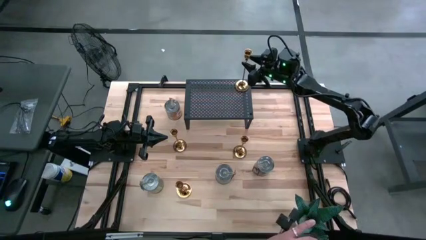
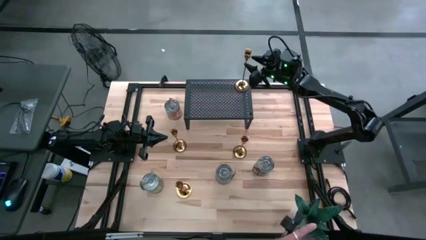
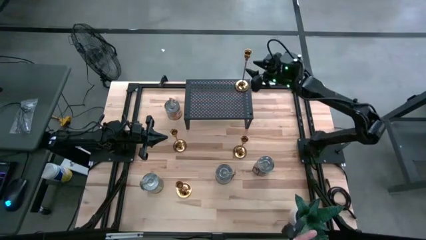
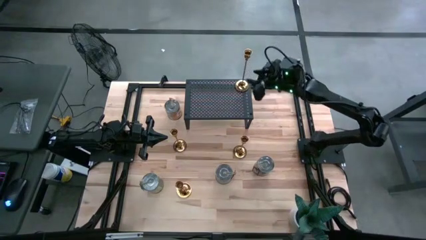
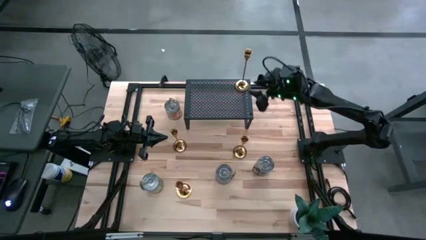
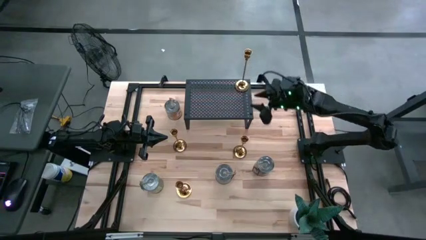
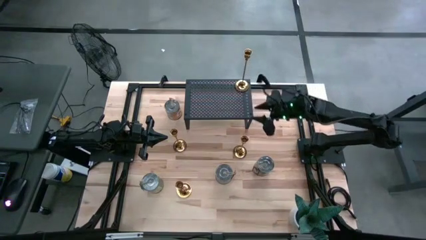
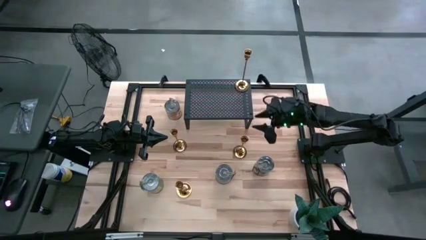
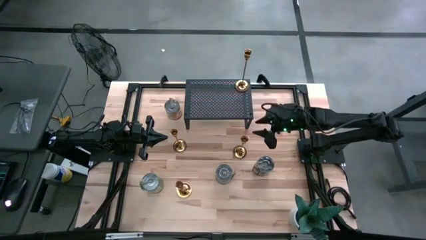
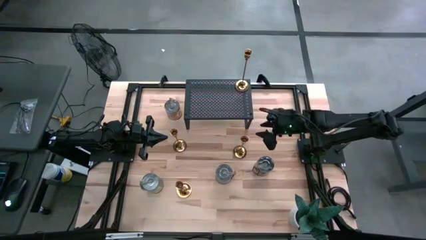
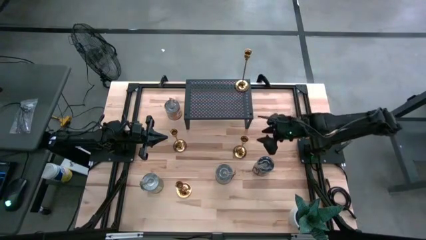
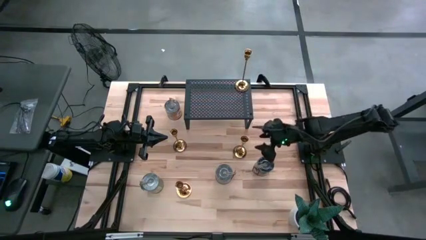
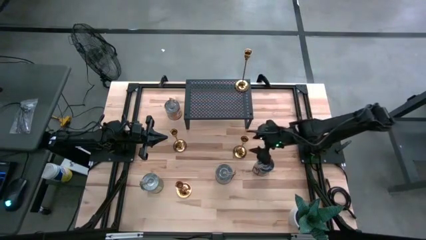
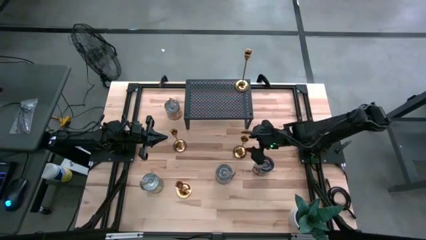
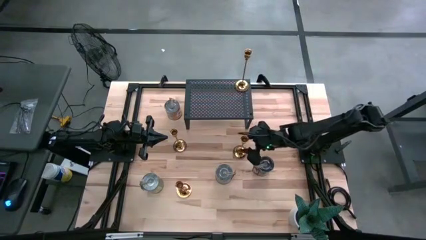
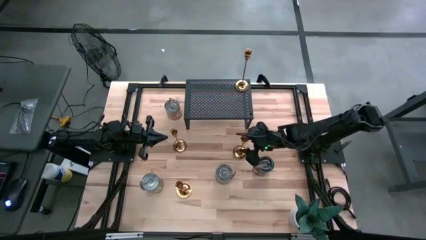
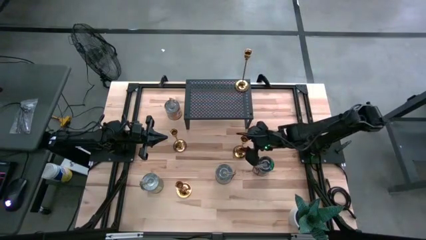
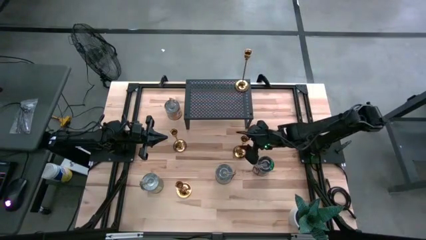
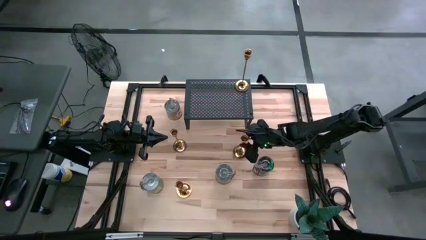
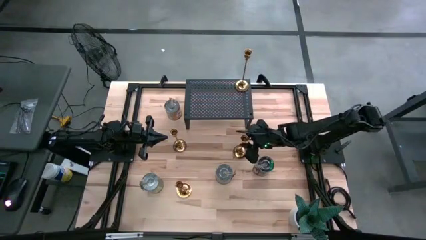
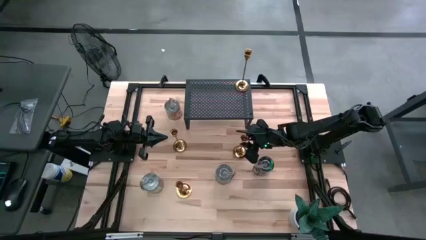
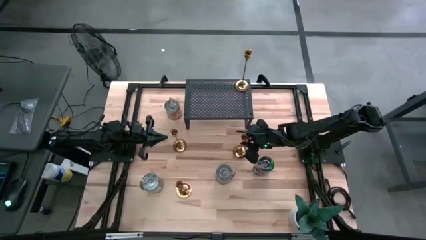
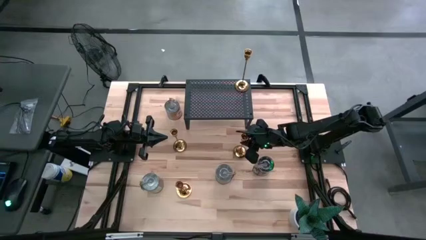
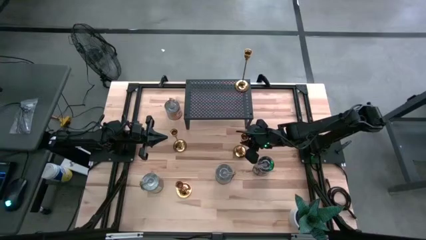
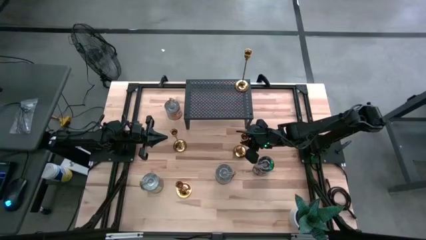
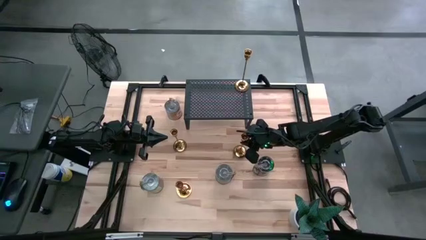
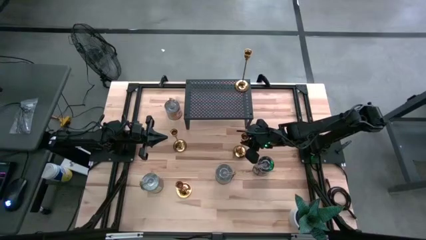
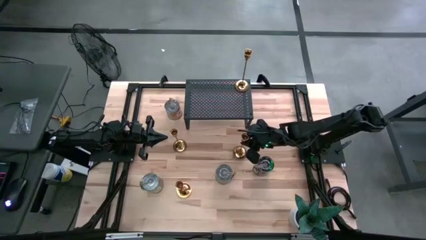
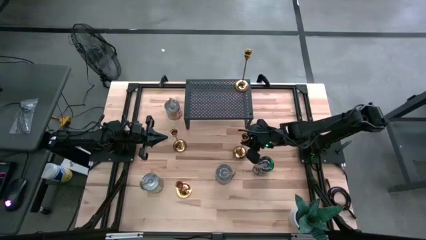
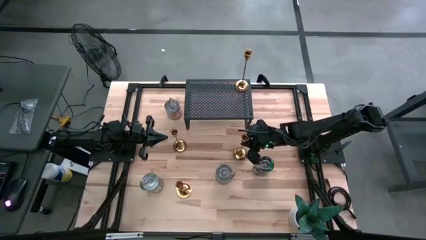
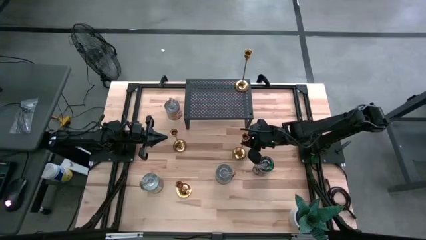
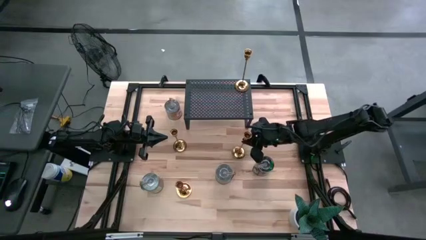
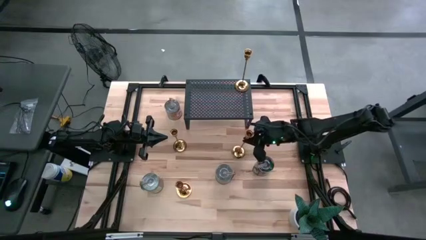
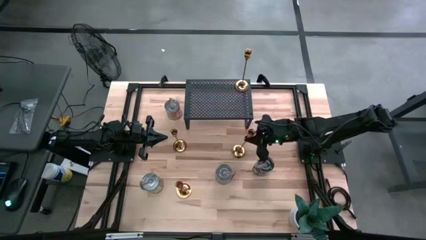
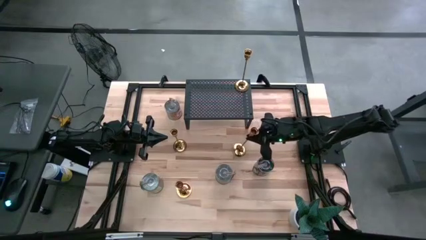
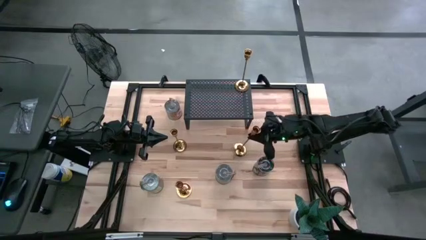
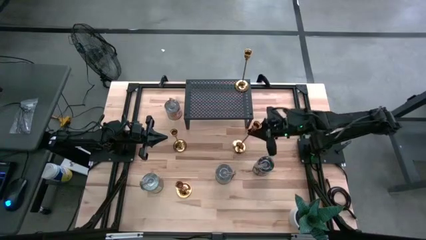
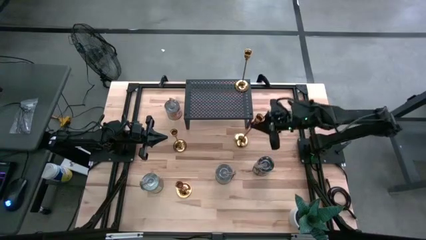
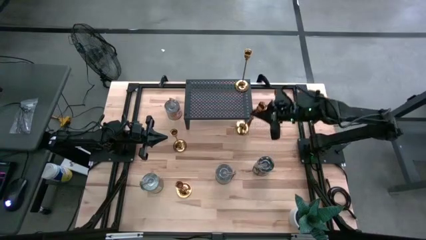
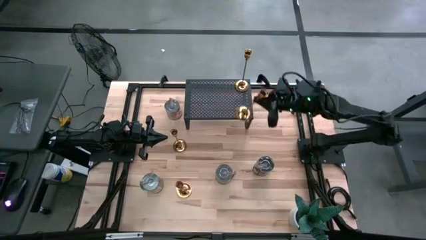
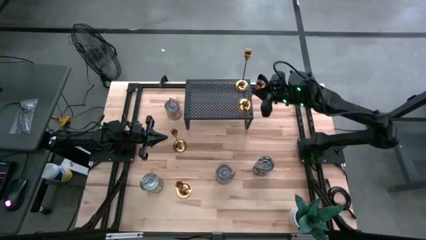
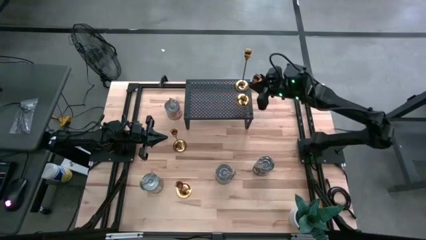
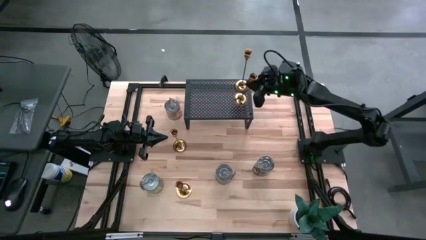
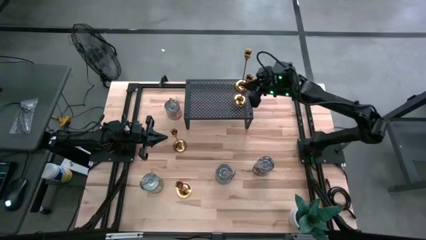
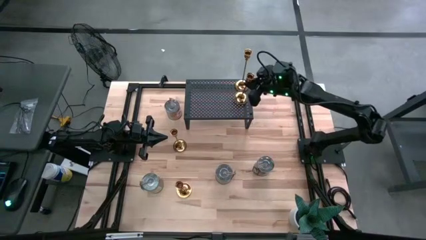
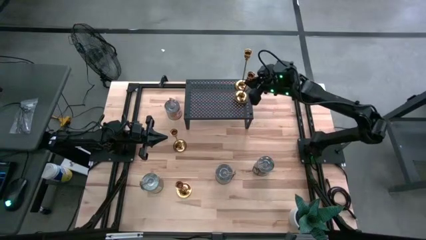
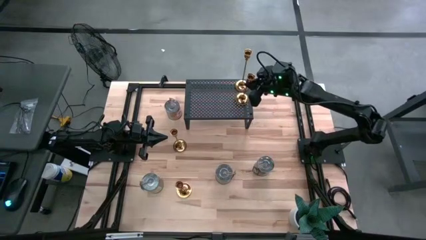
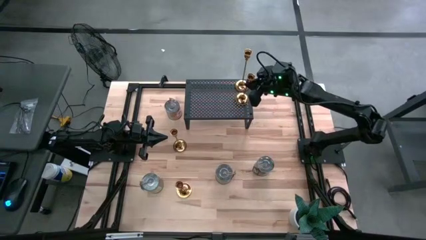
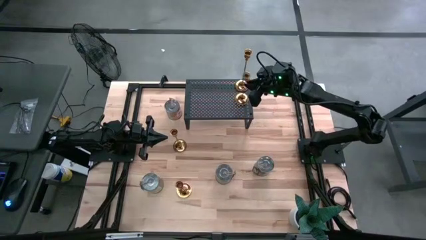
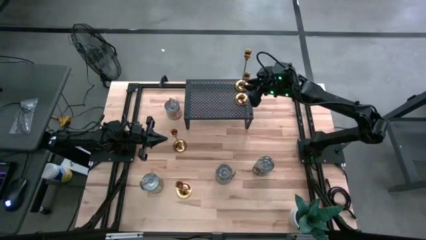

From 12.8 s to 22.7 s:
Task: Pick & Place candle stick holders
Align the golden candle holder with the golden candle holder on the shelf

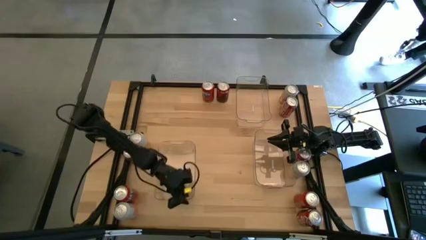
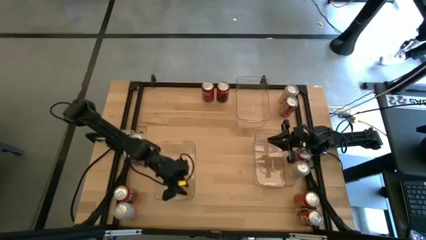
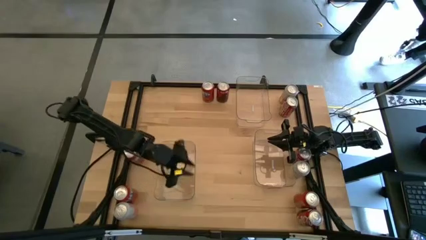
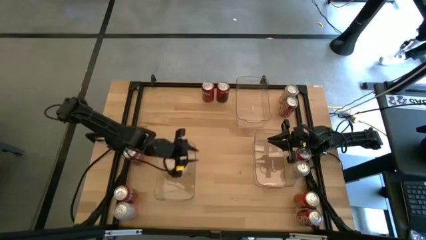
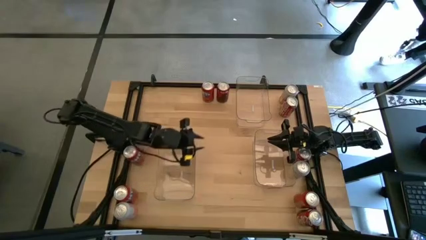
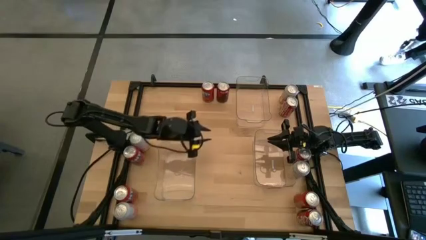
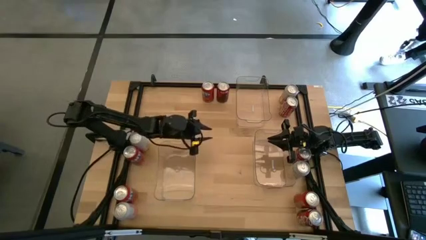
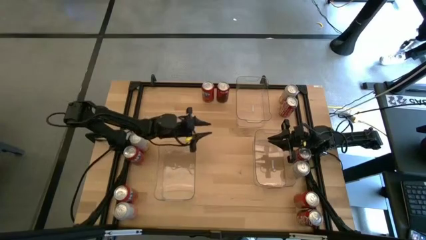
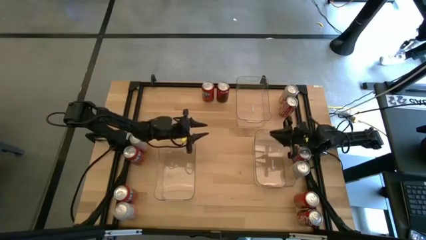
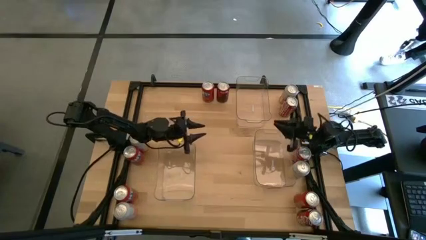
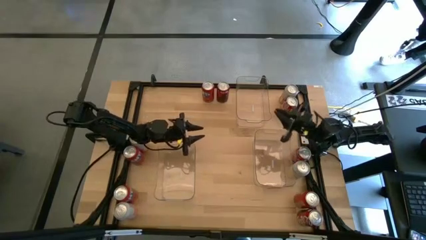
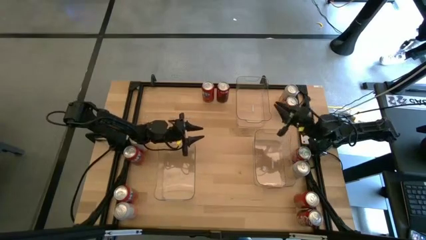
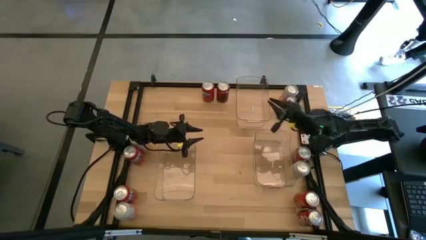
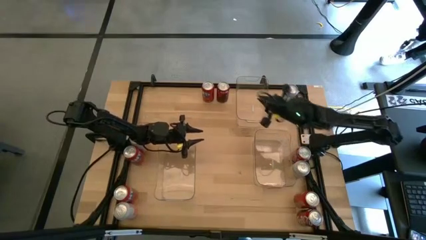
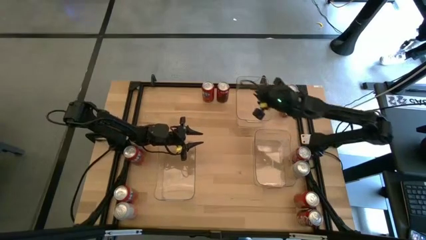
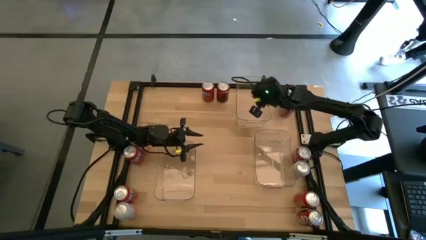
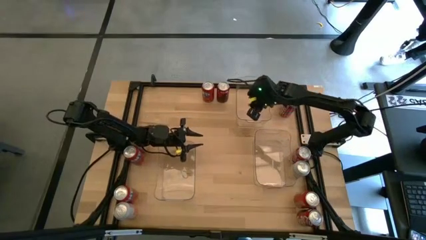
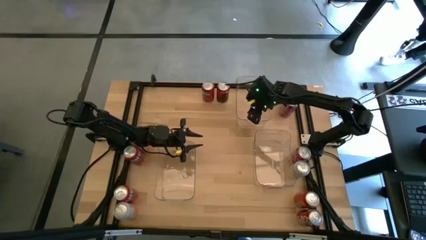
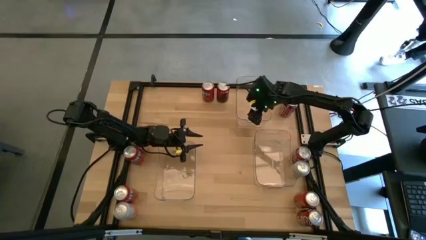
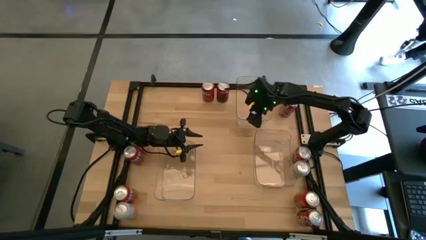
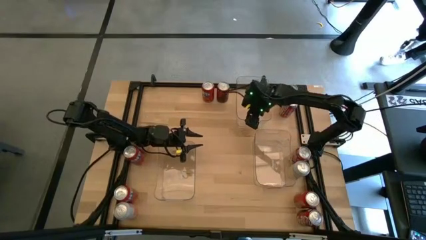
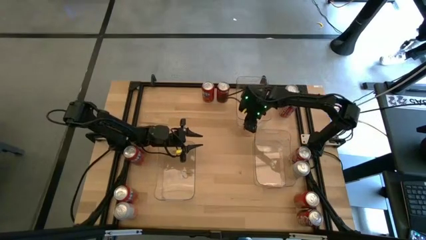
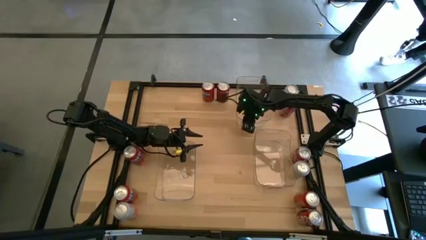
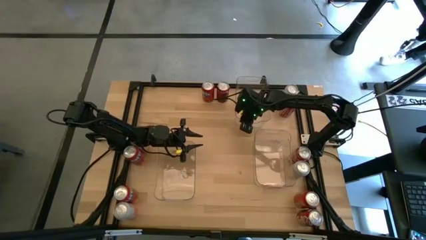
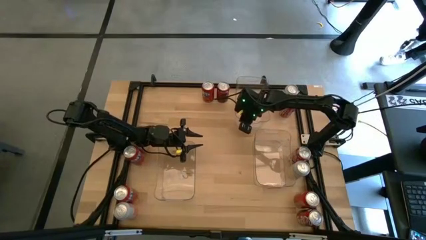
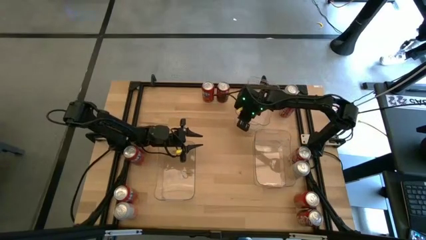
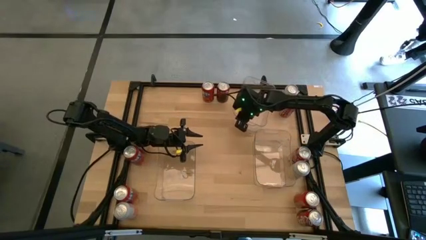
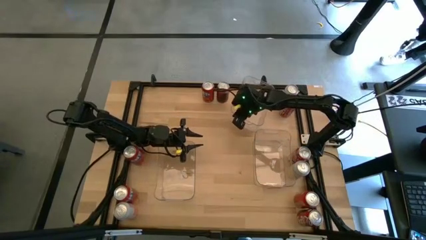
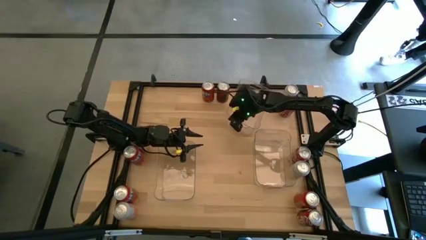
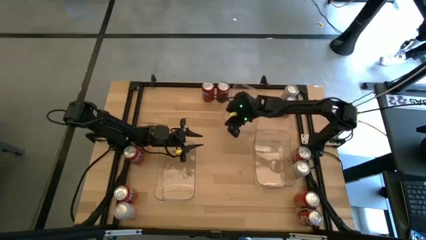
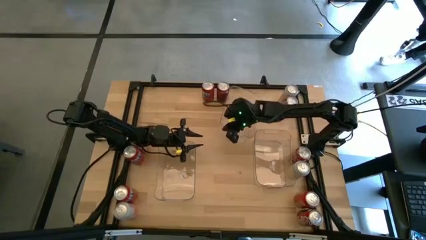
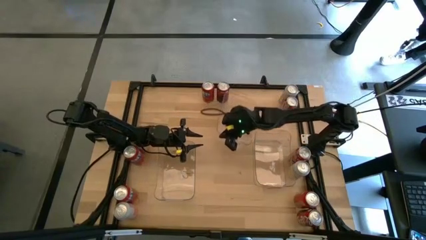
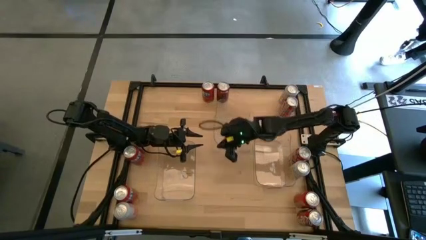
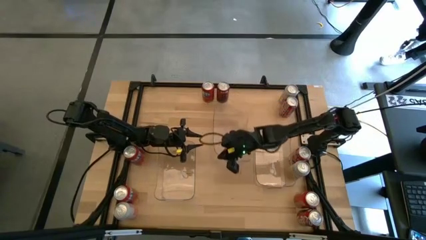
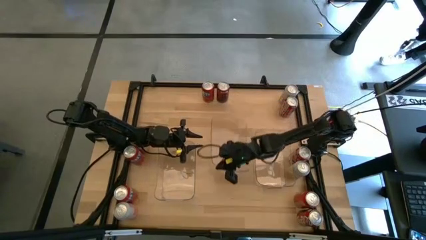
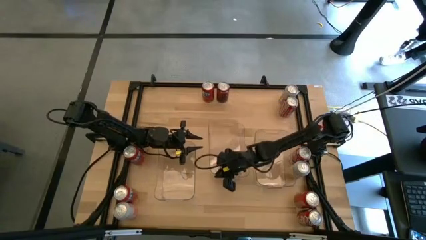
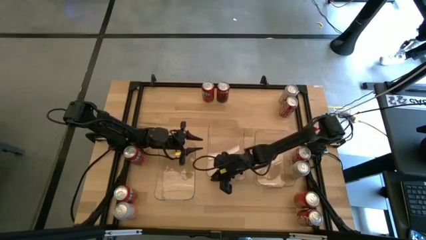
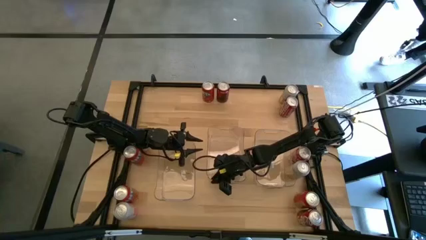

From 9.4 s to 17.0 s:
Task: Sort soda cans
Move the top right transparent bin to the center of the transparent bins
